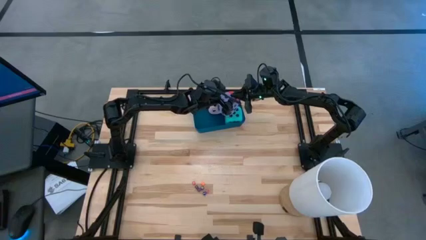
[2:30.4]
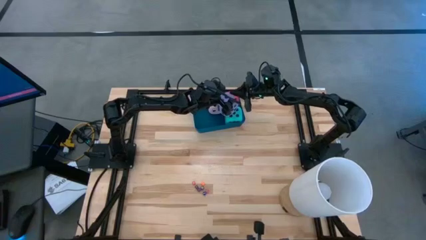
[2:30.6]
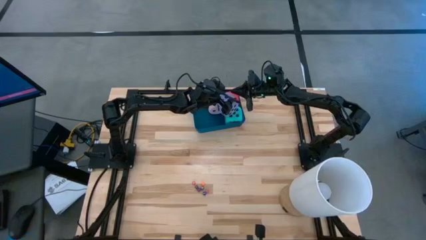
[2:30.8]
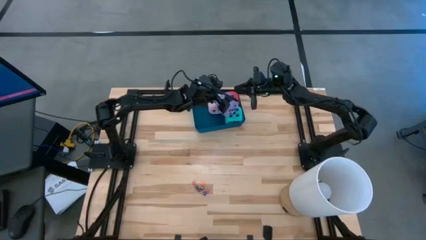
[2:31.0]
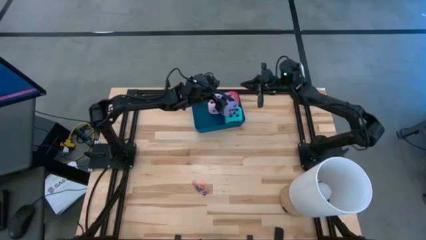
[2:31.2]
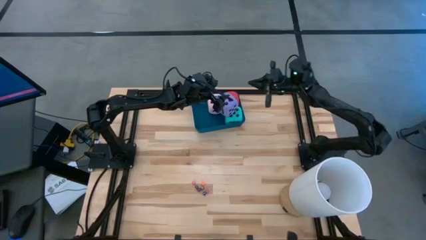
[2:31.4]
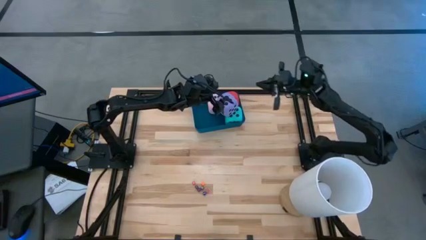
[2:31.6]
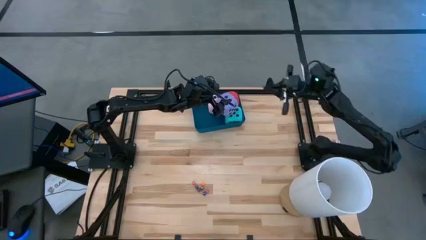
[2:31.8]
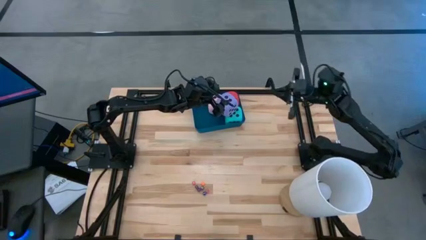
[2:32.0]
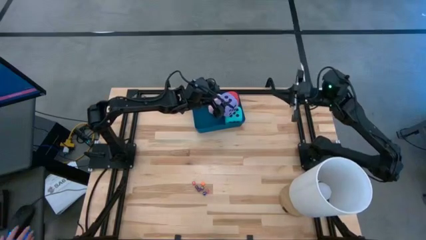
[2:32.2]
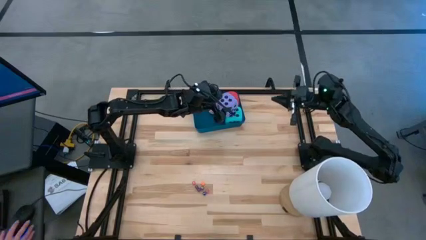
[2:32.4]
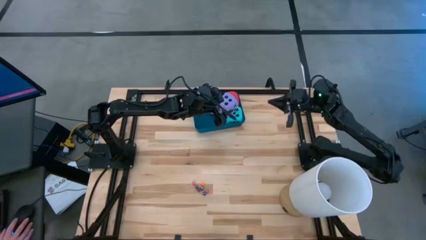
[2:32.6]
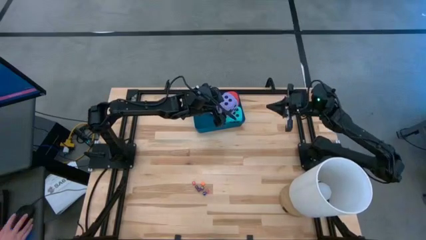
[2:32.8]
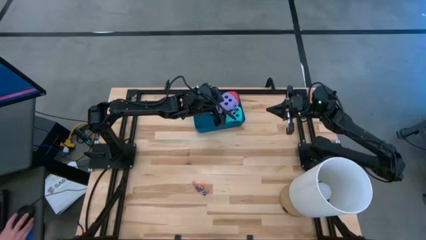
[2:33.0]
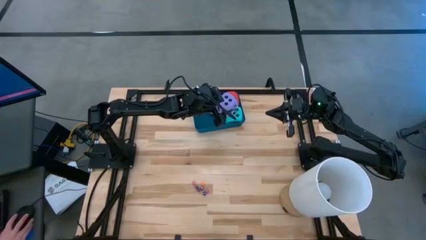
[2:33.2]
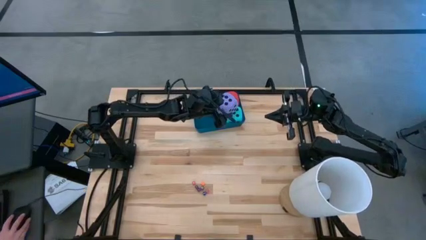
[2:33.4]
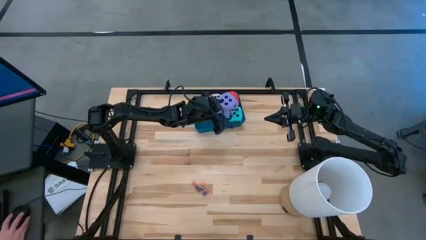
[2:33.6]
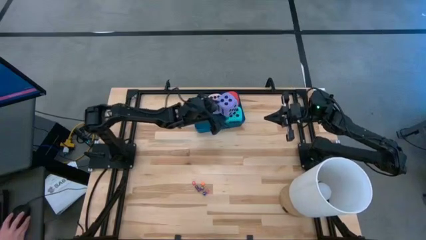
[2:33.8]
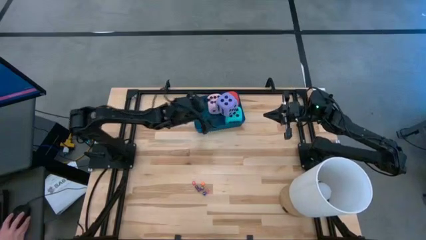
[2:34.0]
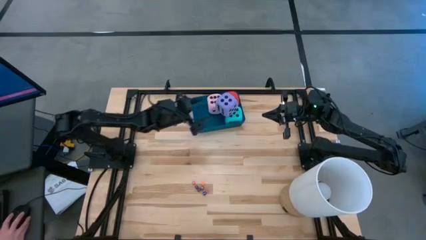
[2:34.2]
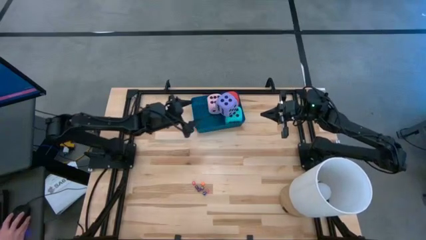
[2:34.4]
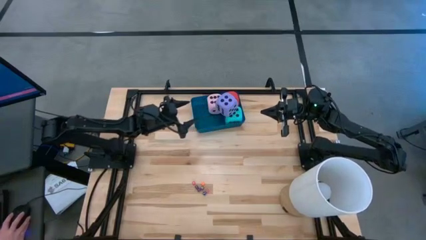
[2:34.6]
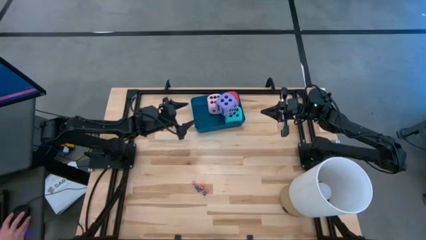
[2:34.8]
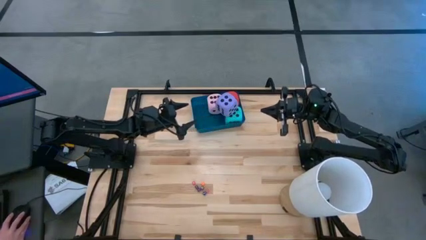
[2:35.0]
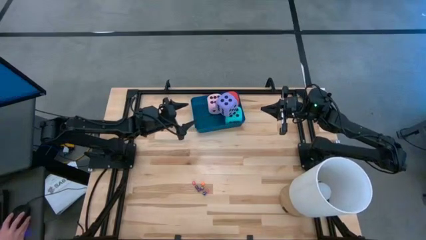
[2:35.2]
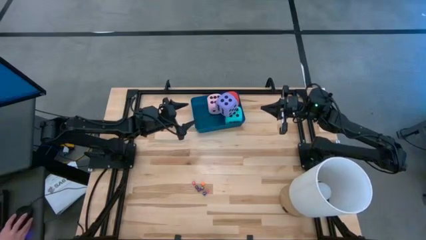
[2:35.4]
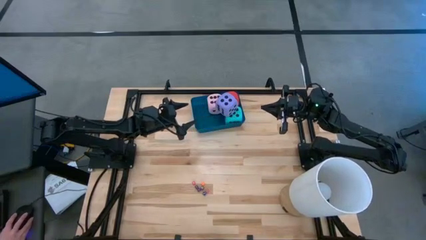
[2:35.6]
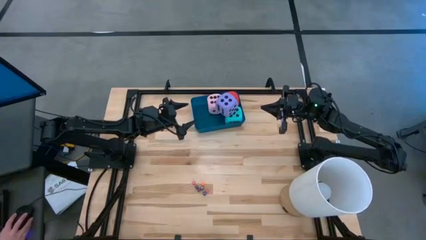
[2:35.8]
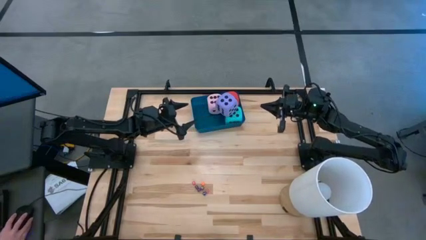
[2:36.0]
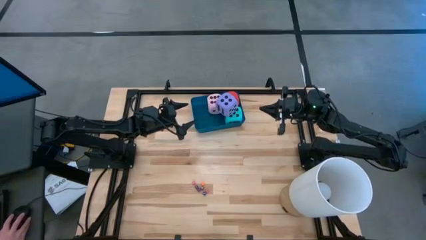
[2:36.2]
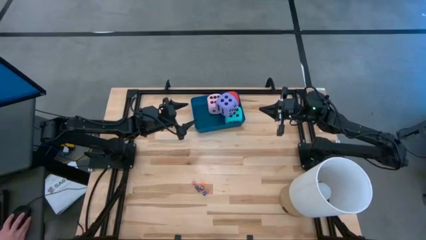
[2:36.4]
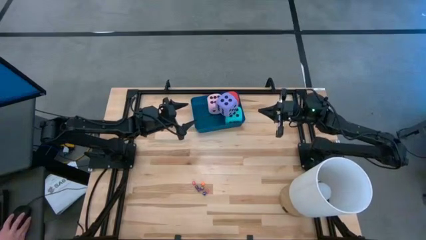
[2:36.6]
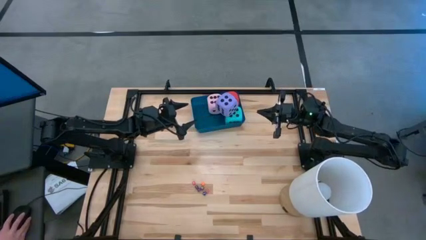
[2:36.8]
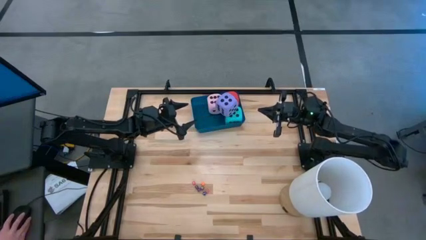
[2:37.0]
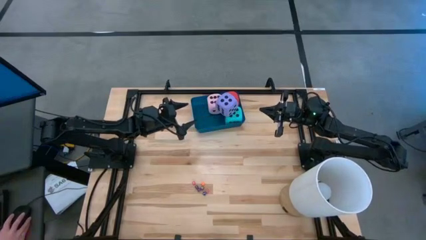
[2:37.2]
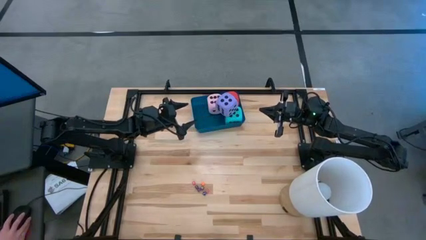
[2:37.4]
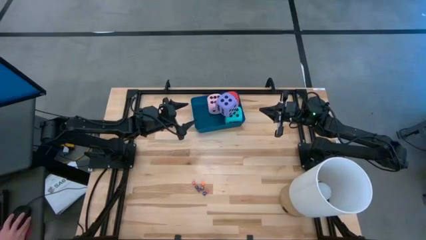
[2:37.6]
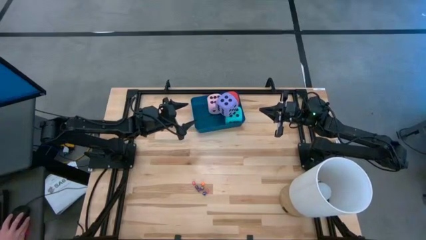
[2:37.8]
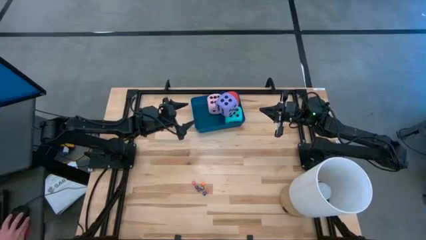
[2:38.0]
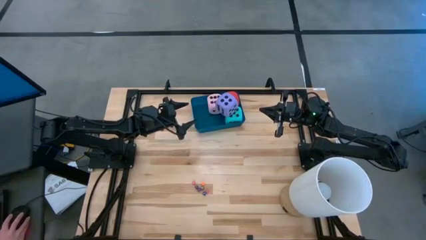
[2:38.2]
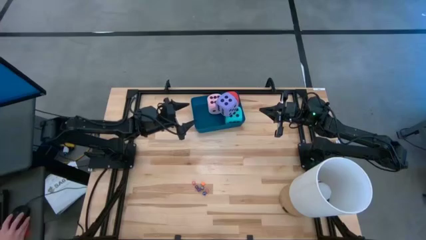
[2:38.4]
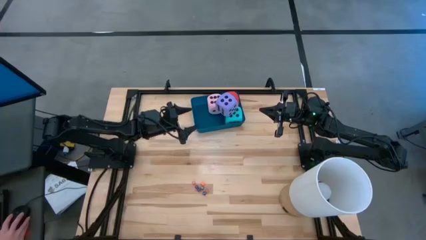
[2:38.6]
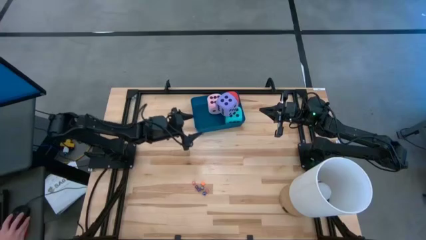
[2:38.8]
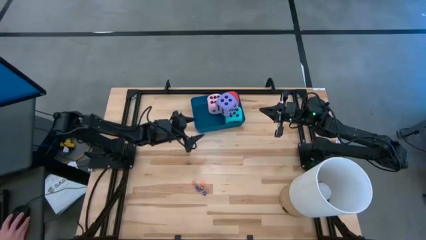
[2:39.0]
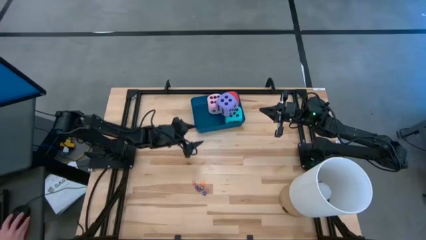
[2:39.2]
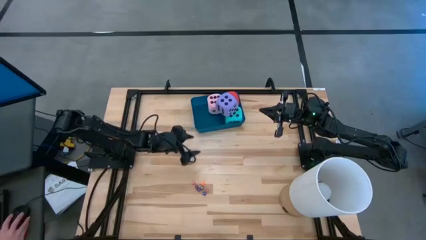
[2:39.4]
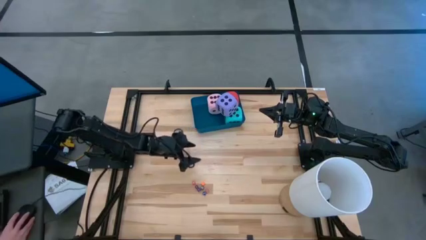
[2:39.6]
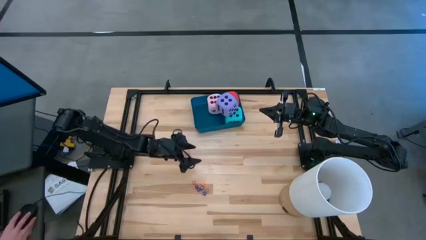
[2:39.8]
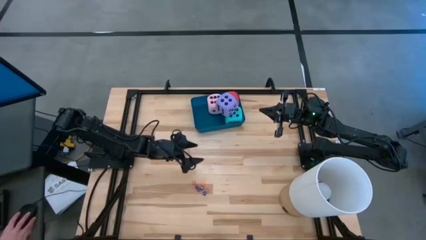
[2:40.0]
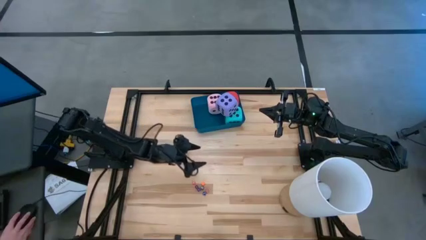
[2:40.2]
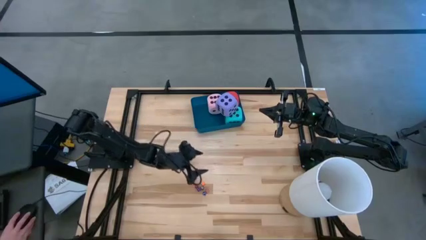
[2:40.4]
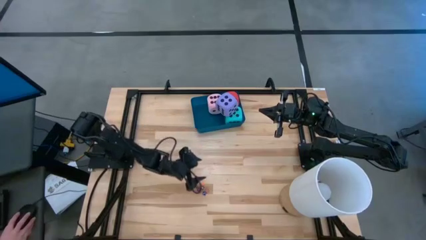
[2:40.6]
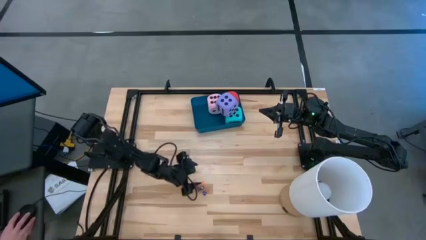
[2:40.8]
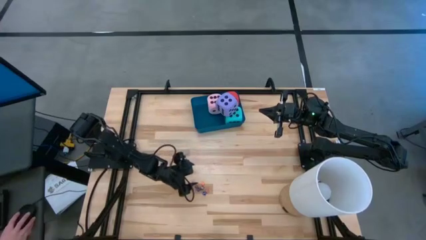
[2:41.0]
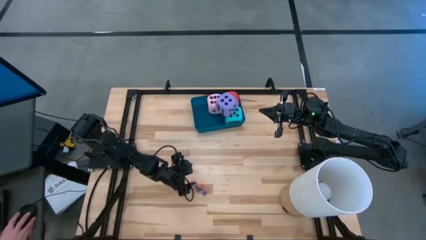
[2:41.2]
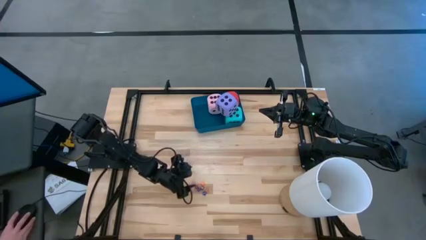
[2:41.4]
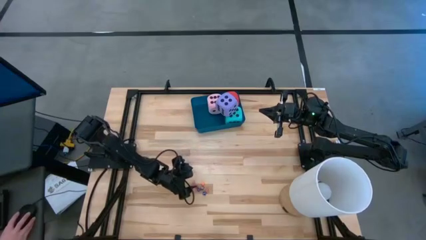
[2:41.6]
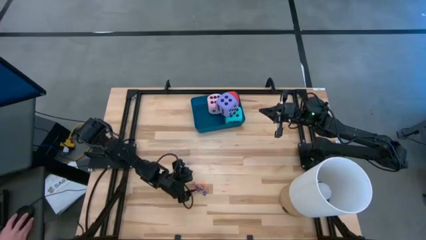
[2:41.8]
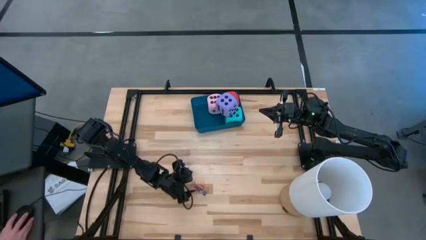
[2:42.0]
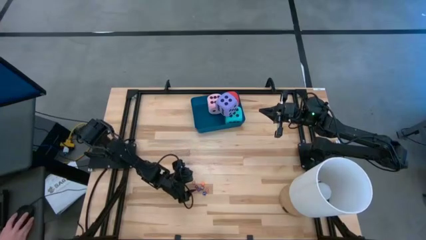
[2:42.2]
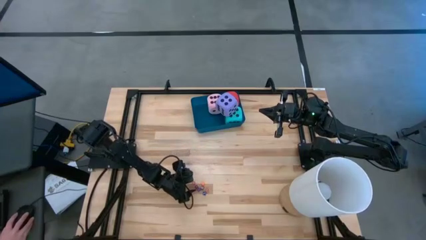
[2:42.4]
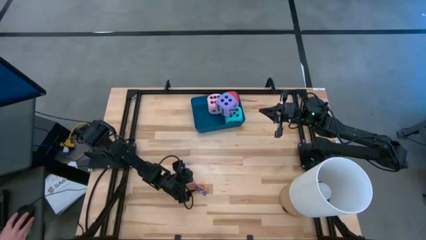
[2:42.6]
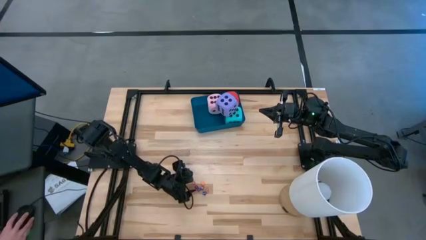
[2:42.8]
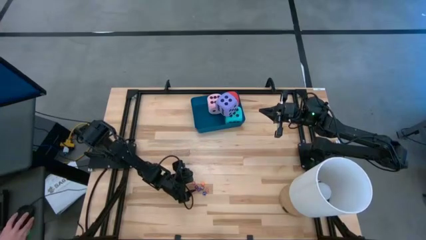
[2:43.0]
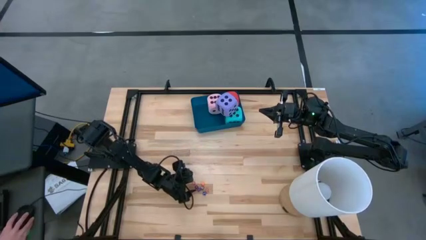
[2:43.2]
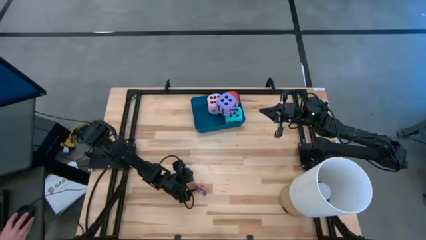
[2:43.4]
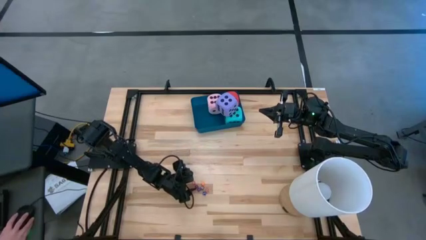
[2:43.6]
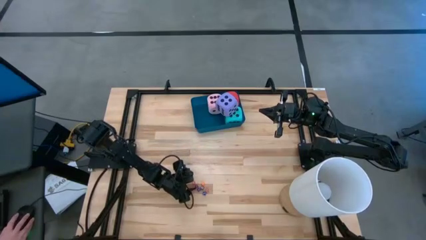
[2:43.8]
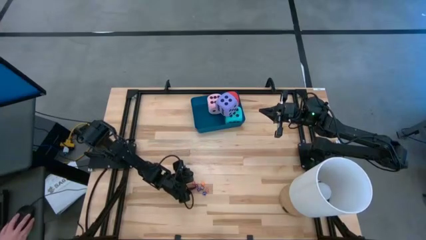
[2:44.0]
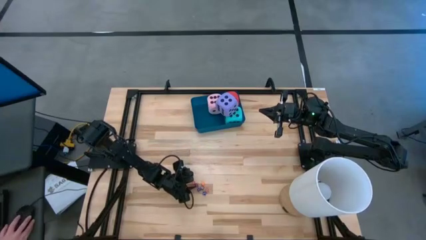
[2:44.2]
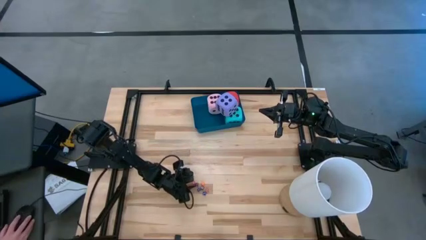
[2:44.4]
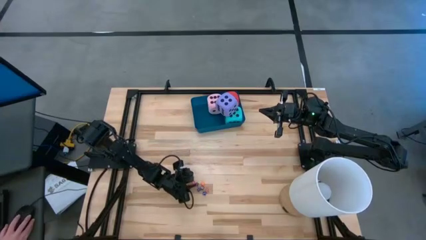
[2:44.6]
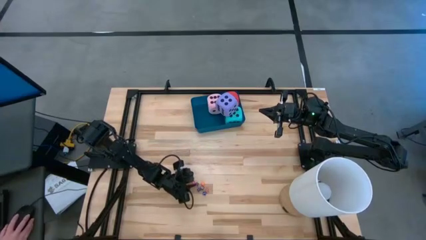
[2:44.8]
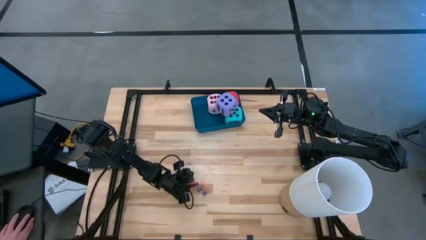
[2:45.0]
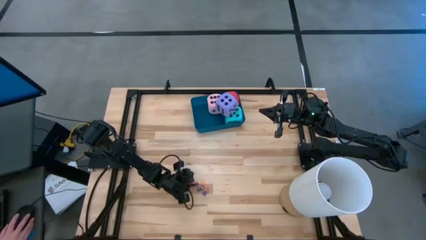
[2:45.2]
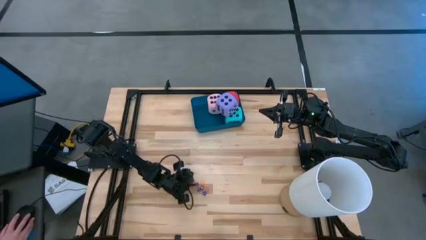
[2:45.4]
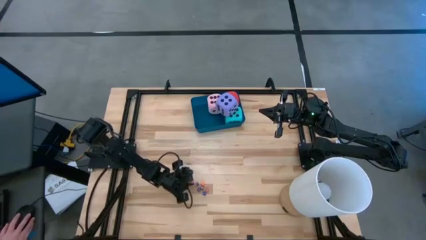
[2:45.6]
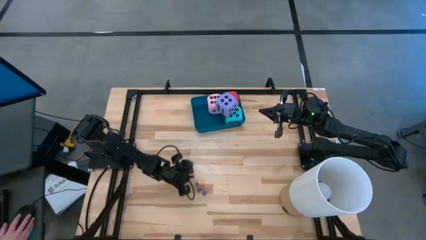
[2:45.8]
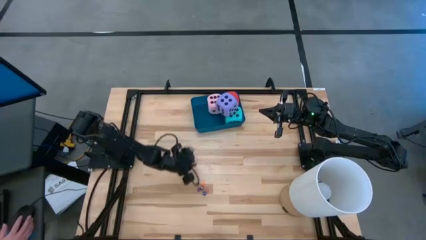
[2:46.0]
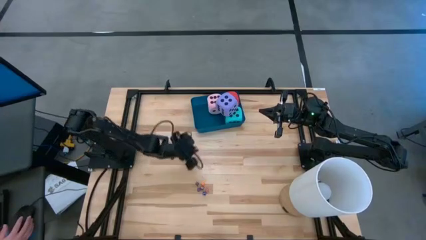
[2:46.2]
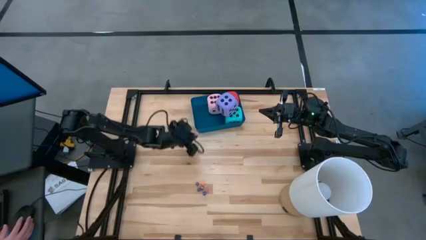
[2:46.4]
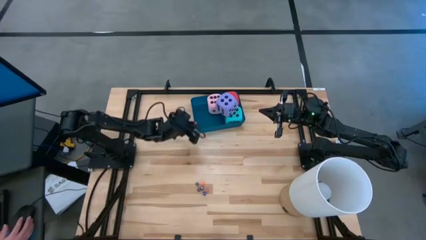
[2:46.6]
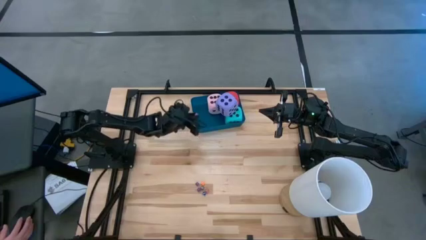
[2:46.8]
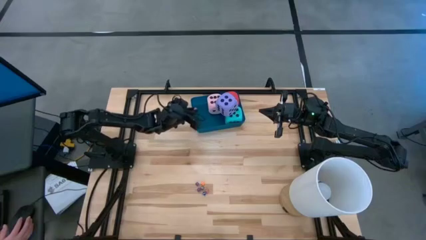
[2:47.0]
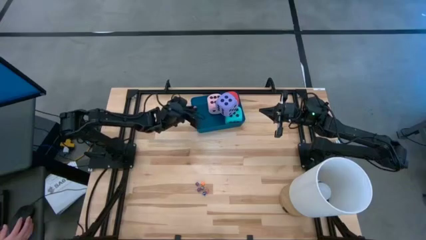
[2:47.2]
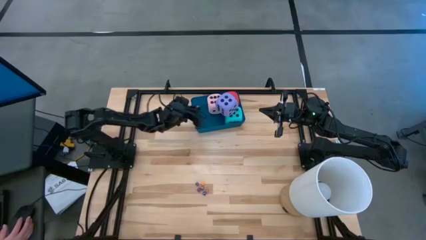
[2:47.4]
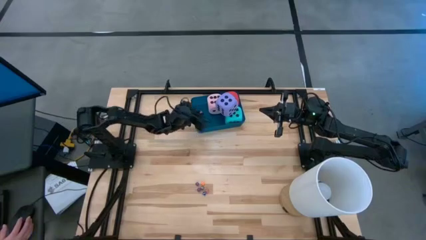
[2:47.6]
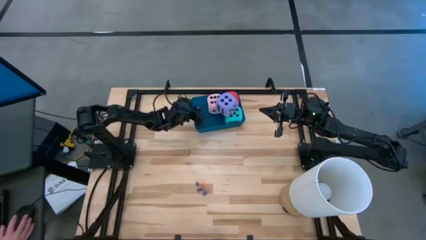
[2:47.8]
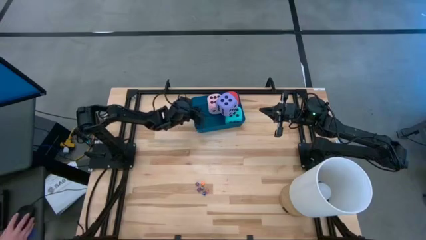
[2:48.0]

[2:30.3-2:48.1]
Task: Pick & Place Dice
Put the left small red dice into the blue bin
